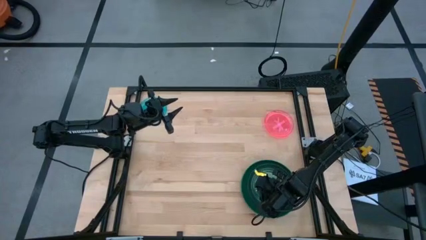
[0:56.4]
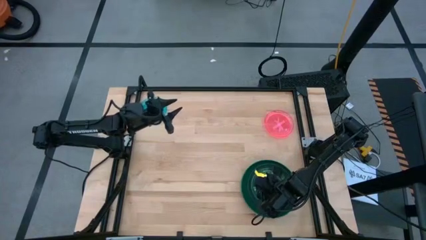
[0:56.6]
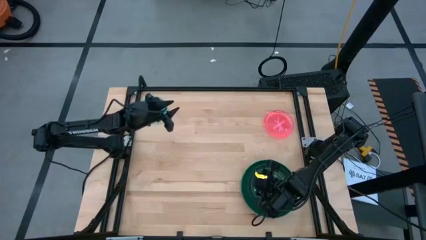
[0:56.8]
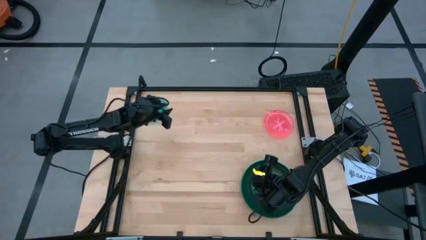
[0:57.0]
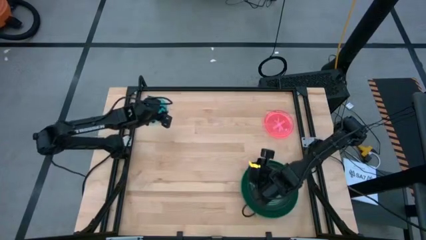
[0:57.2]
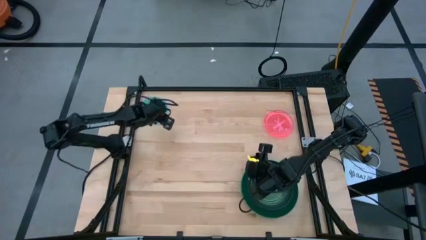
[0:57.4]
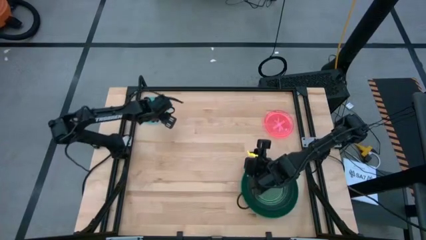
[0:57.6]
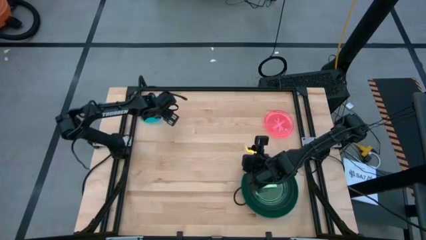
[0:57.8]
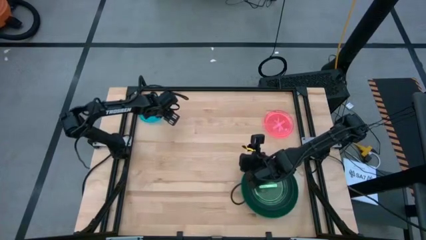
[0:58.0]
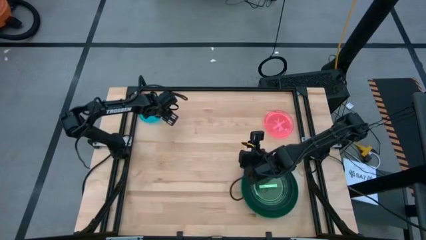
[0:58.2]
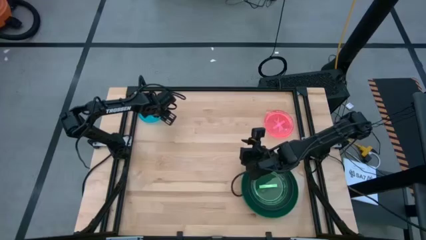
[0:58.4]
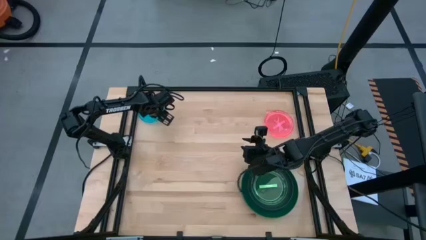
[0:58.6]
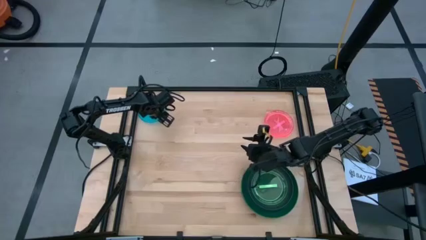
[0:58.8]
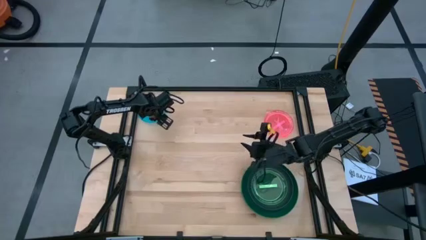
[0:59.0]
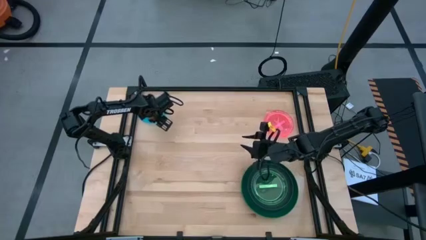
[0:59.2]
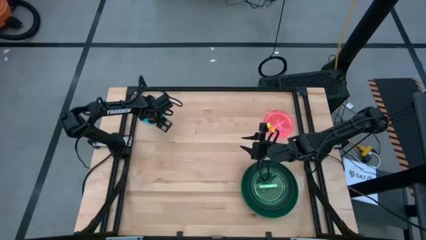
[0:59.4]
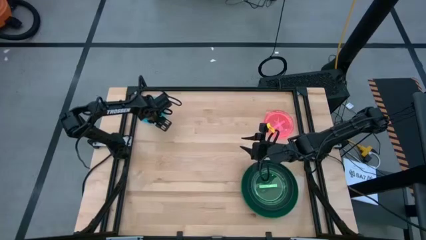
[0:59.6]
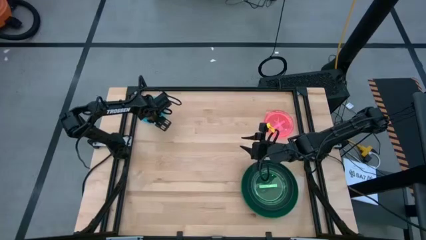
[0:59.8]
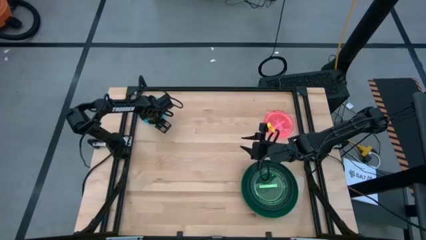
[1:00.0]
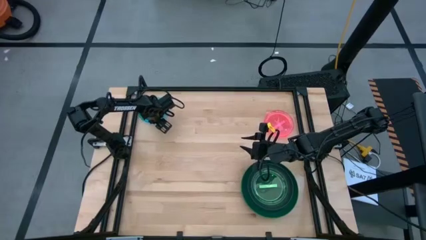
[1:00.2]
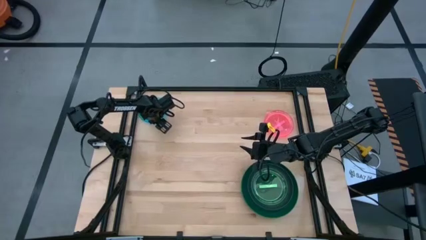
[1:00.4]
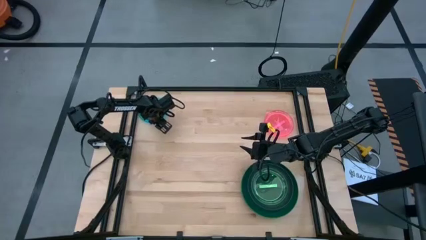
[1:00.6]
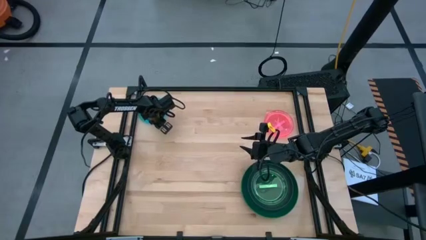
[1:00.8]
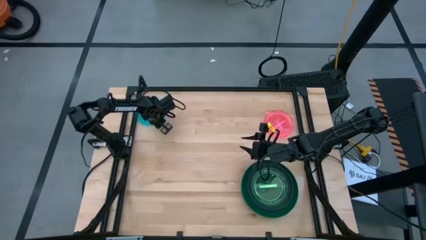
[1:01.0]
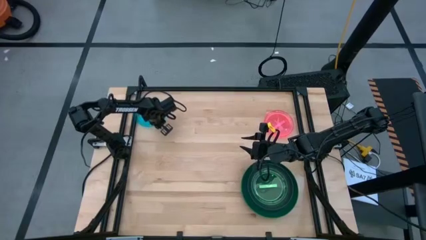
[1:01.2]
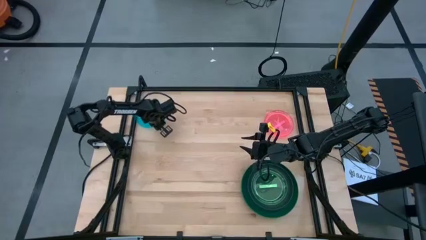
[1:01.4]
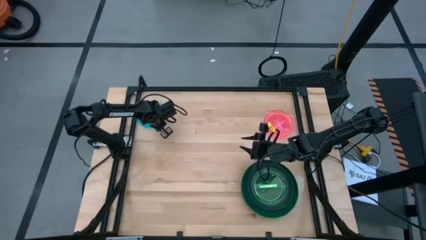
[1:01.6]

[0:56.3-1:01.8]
Task: Stack plastic plates
Stack the blue plate on top of the light green plate

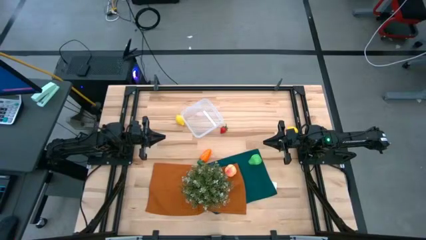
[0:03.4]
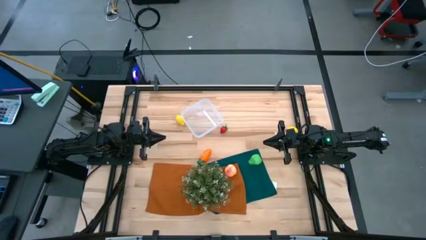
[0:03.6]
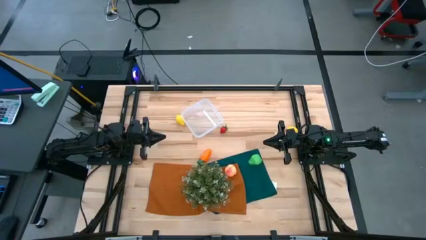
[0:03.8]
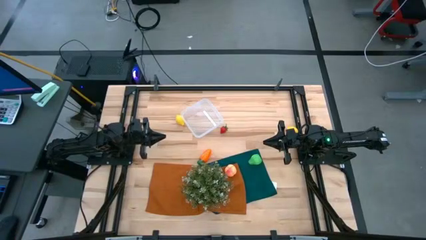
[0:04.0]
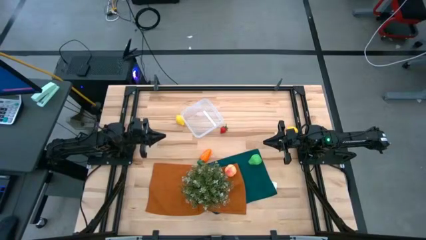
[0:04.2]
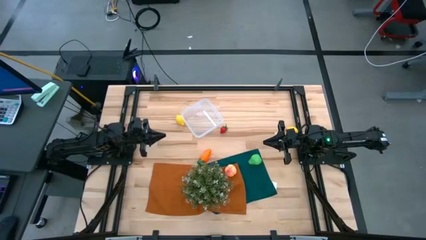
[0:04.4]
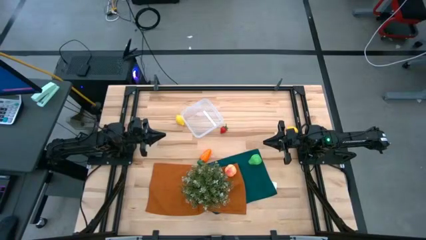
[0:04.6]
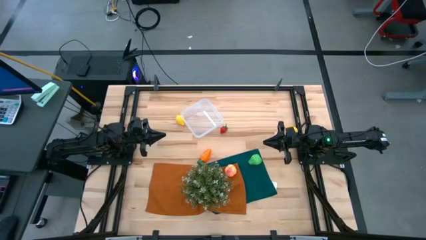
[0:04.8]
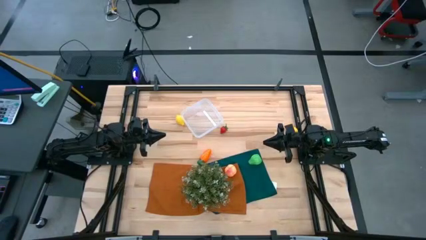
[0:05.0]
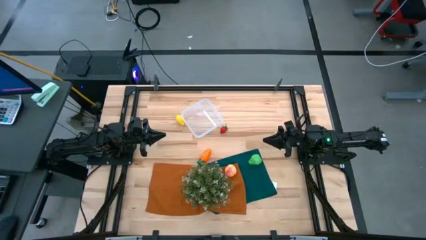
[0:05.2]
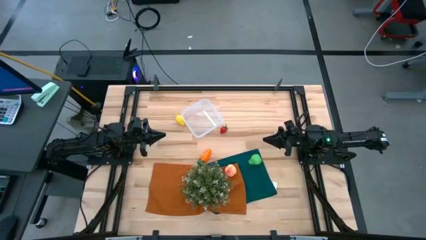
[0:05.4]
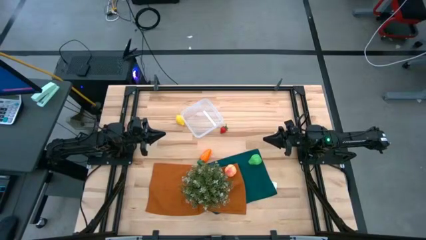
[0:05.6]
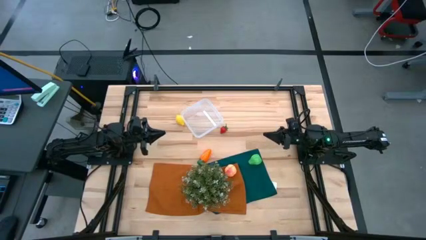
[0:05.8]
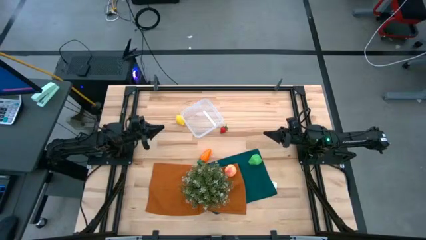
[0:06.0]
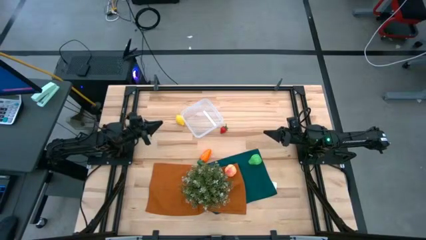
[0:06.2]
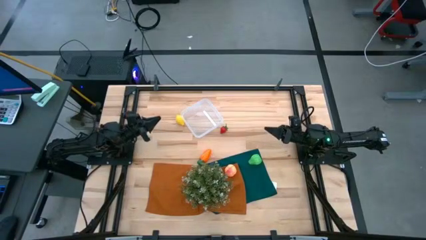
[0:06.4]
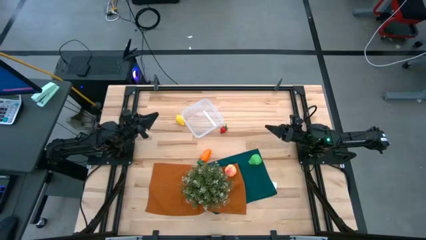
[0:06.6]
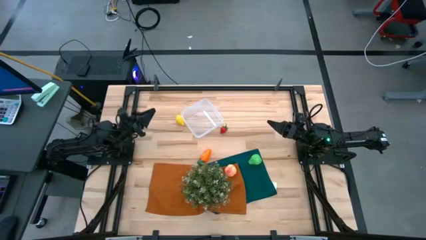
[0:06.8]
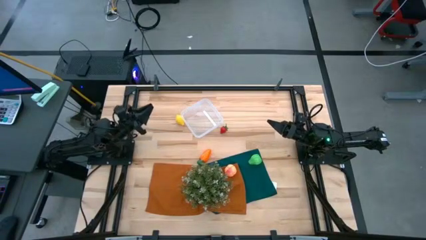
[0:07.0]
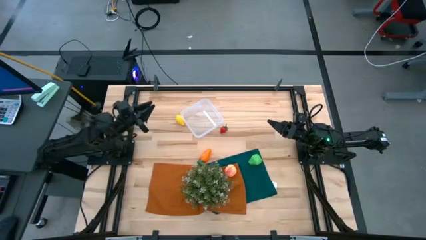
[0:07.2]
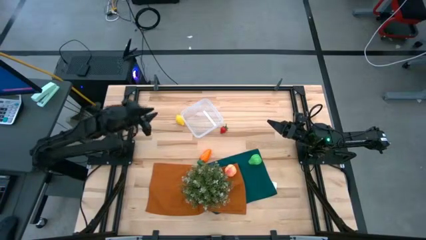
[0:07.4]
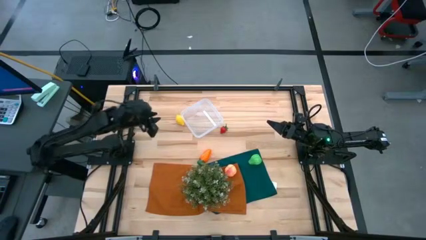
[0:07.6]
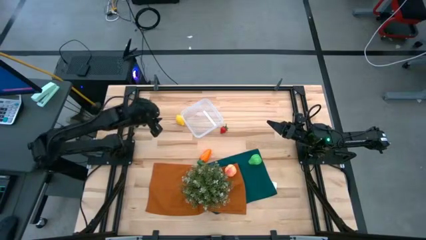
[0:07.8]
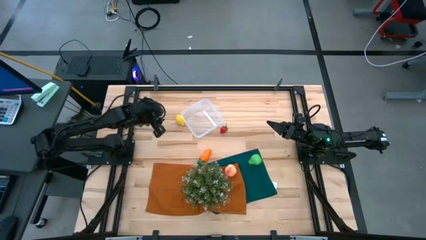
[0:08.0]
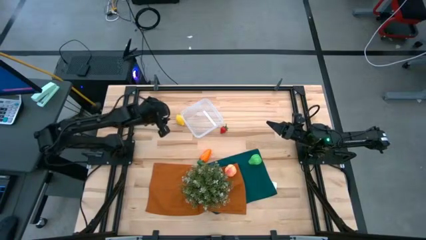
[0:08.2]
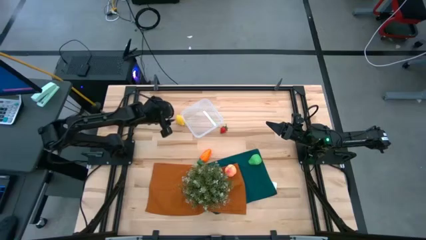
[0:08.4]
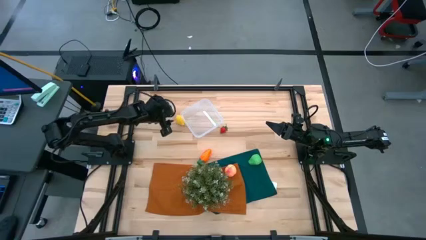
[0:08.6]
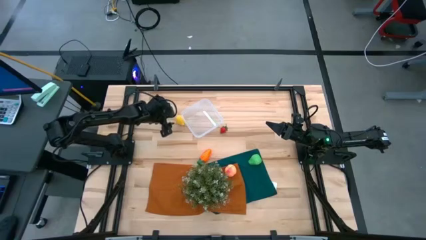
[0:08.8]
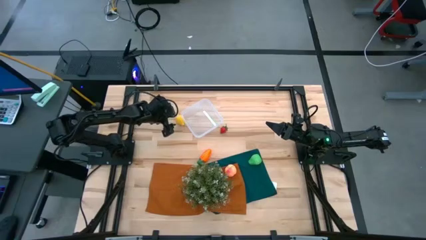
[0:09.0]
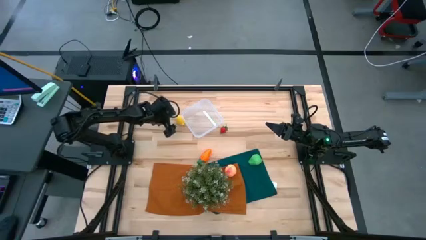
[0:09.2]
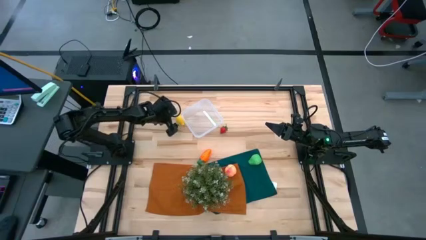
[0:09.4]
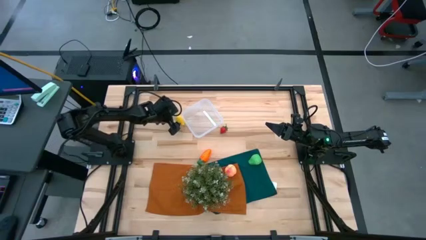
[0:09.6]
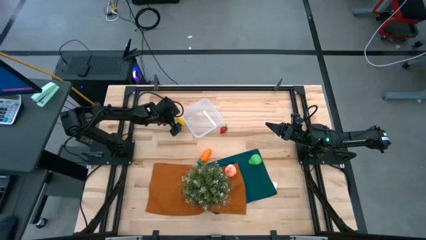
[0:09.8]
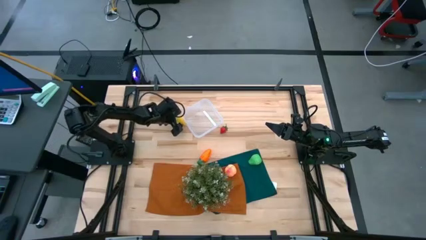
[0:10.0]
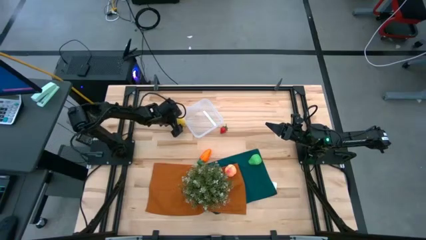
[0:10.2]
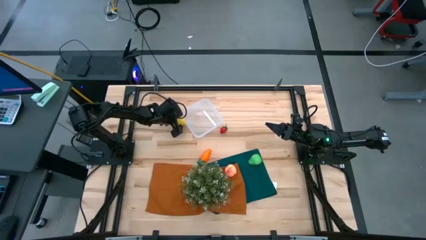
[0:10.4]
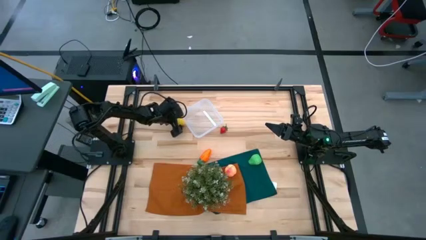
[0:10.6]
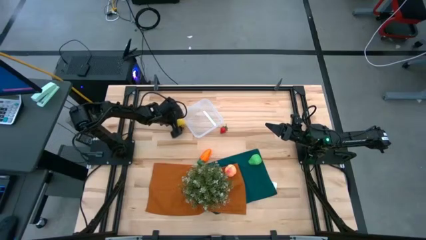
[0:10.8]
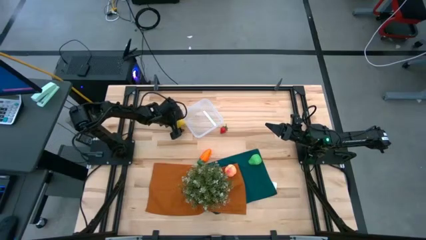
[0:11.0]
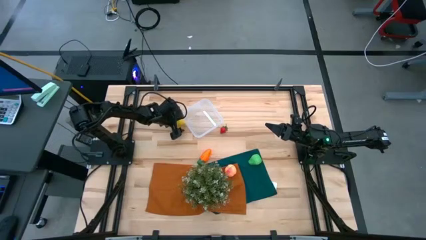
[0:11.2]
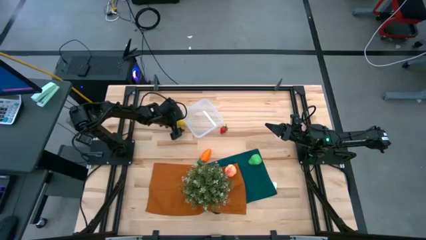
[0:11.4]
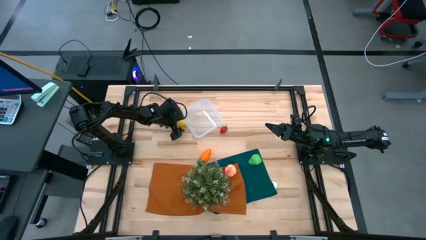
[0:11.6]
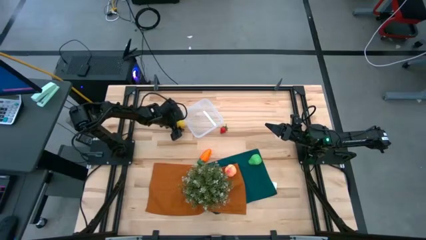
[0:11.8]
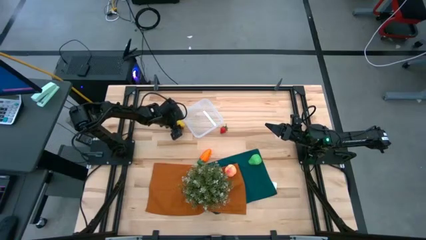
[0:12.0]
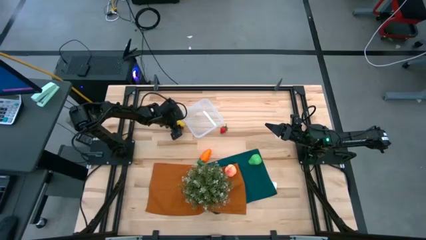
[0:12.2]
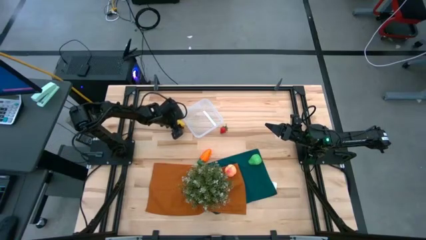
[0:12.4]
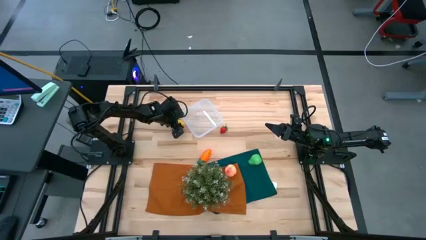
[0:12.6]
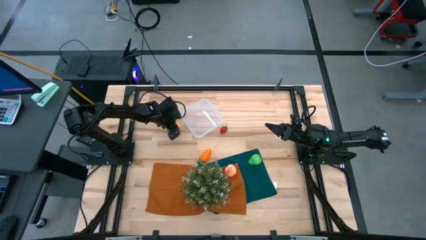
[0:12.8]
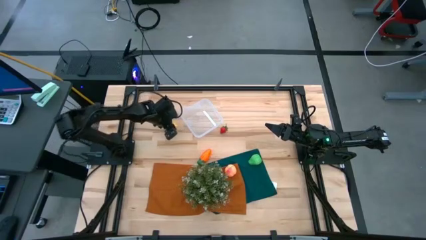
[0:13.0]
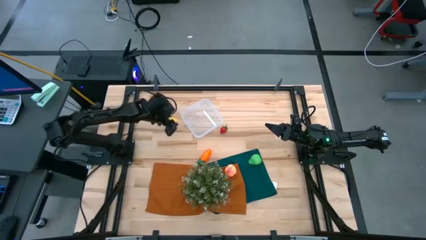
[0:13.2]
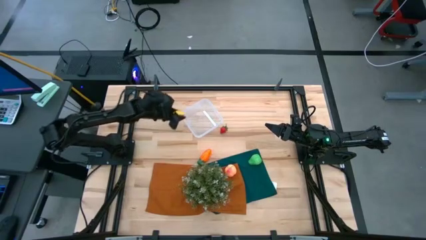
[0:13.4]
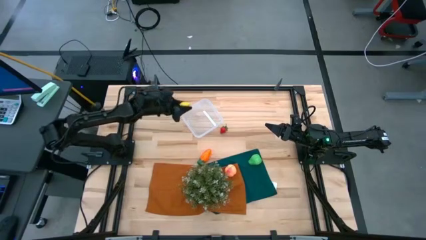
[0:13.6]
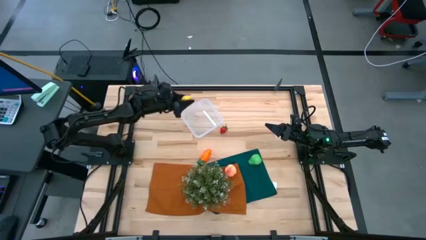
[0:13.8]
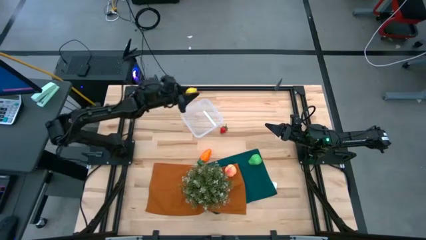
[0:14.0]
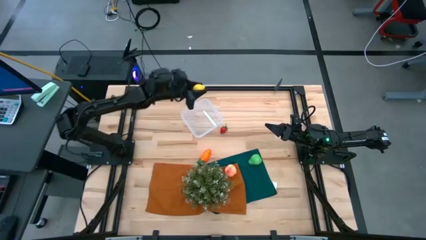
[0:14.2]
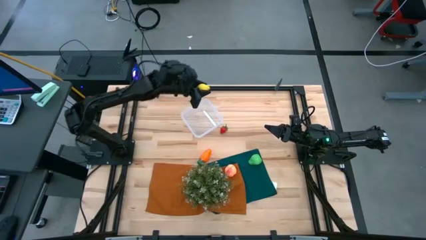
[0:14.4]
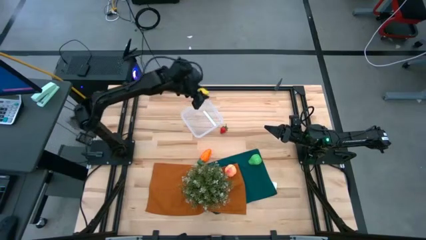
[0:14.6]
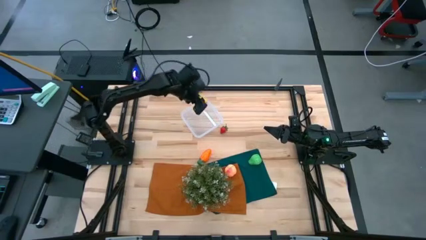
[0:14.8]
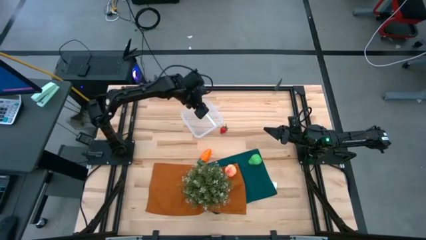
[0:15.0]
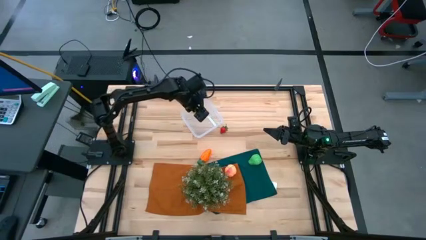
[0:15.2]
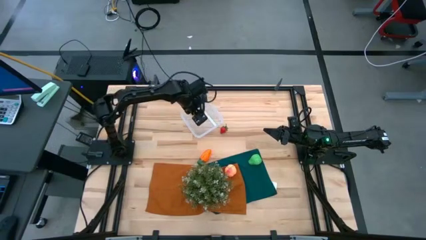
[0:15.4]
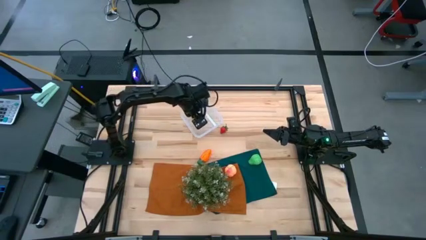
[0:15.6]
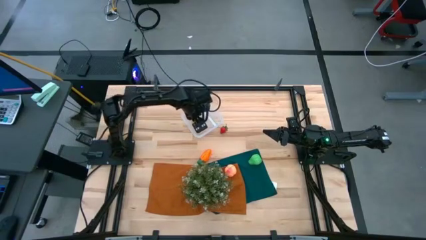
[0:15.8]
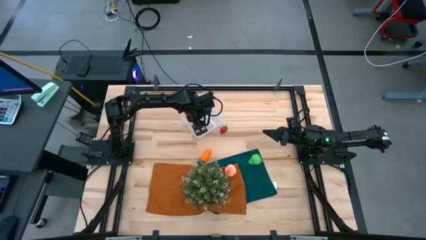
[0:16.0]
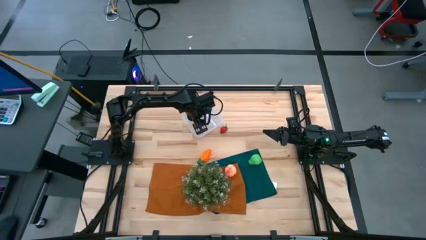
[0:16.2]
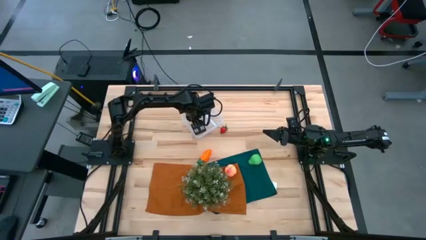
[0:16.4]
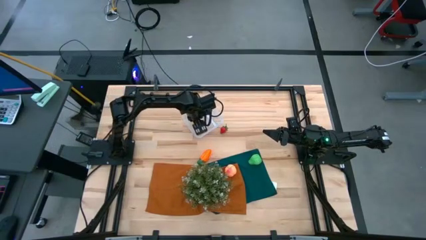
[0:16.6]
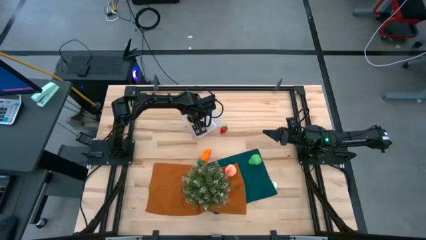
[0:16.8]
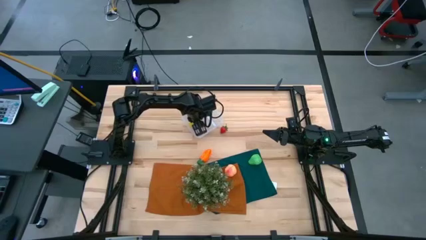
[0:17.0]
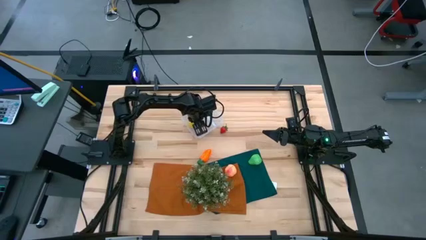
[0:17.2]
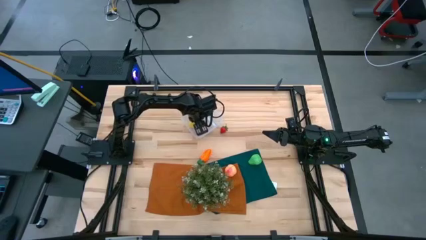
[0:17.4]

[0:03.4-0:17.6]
Task: Pick and placing Produce into tupperware
Put the left lemon into the transparent container
